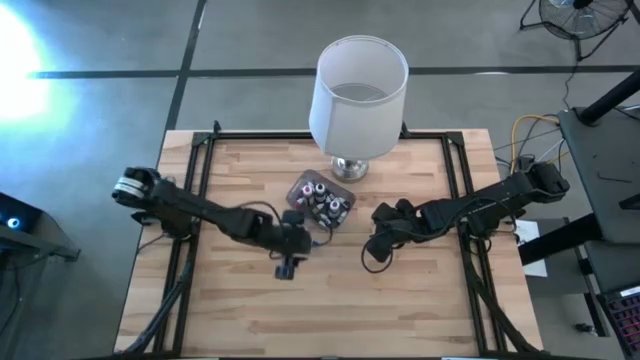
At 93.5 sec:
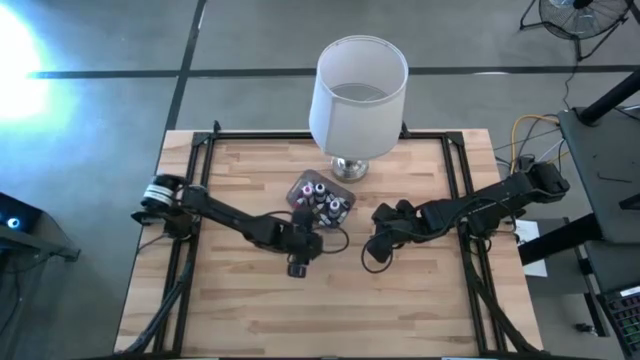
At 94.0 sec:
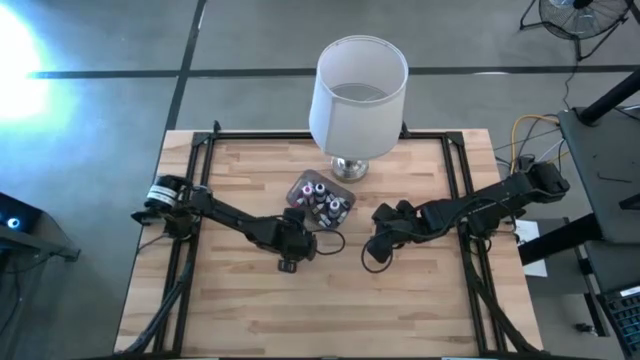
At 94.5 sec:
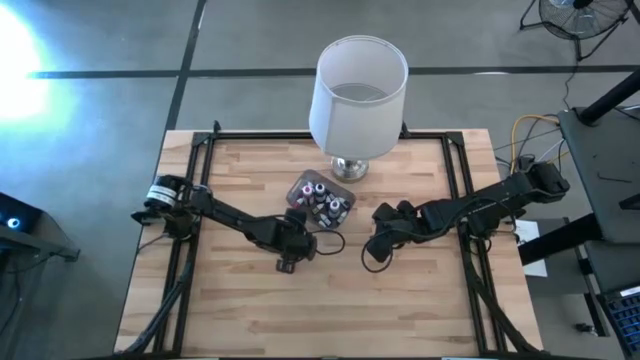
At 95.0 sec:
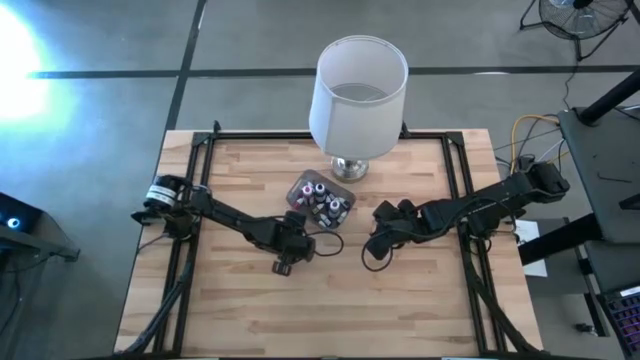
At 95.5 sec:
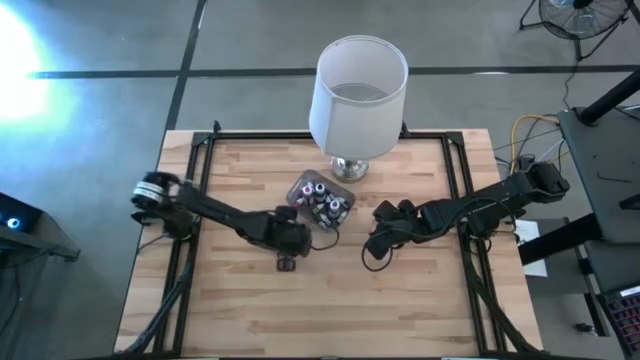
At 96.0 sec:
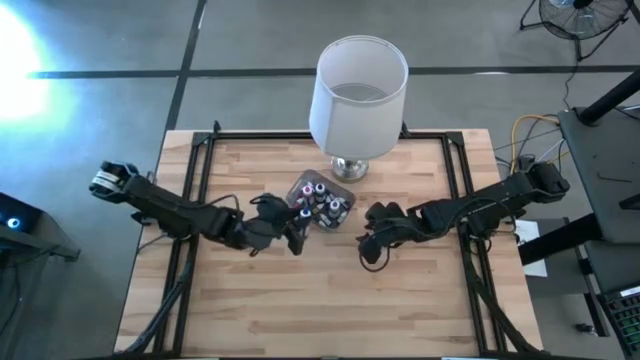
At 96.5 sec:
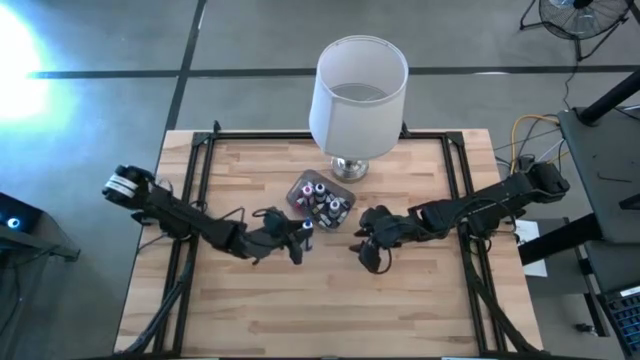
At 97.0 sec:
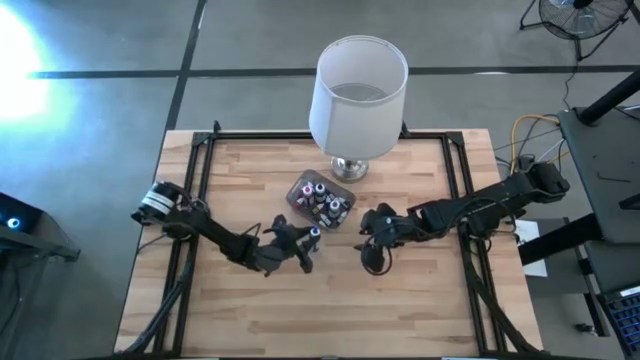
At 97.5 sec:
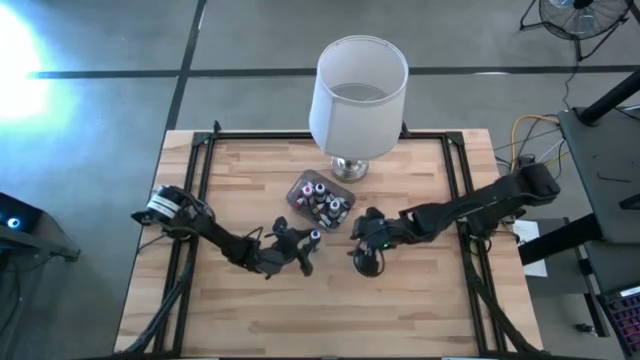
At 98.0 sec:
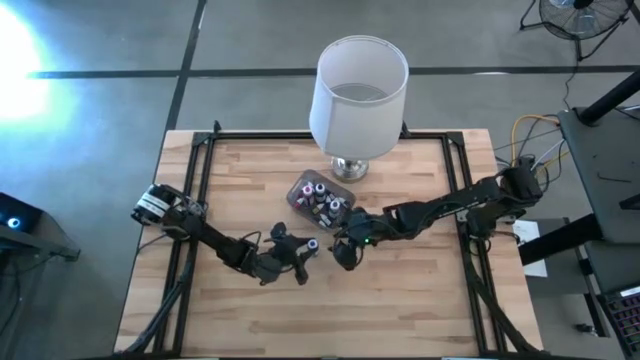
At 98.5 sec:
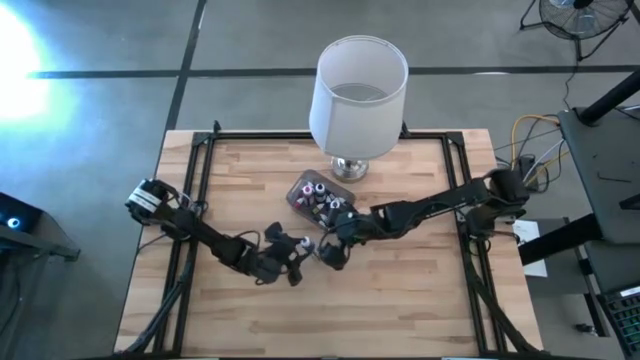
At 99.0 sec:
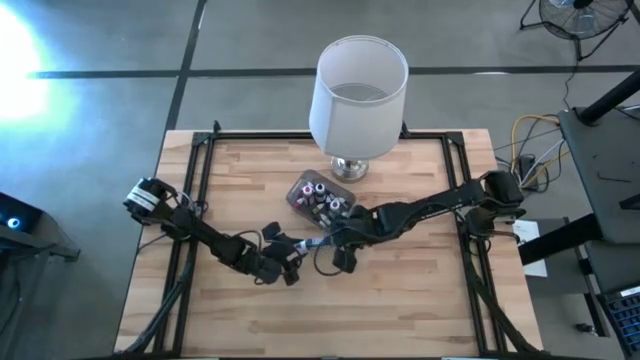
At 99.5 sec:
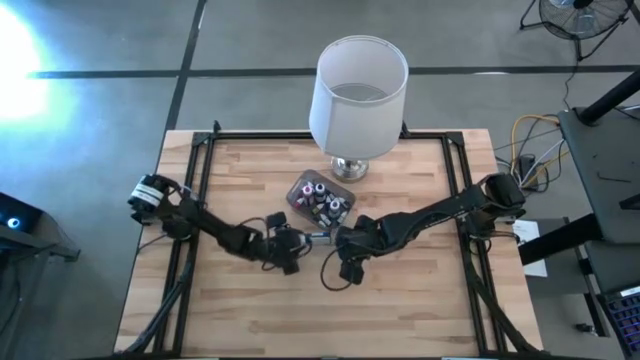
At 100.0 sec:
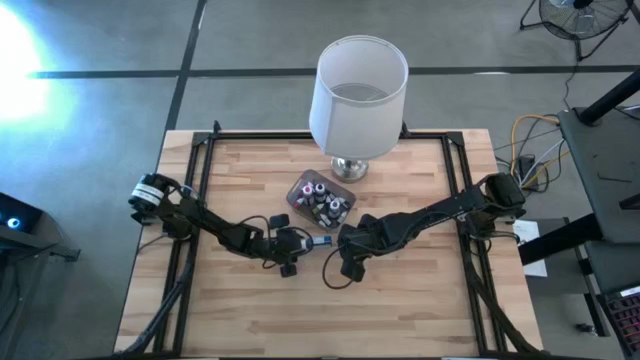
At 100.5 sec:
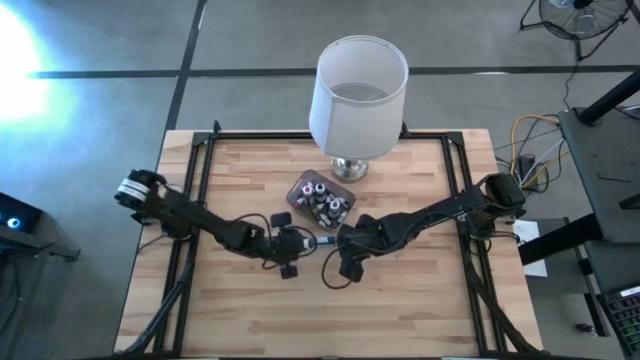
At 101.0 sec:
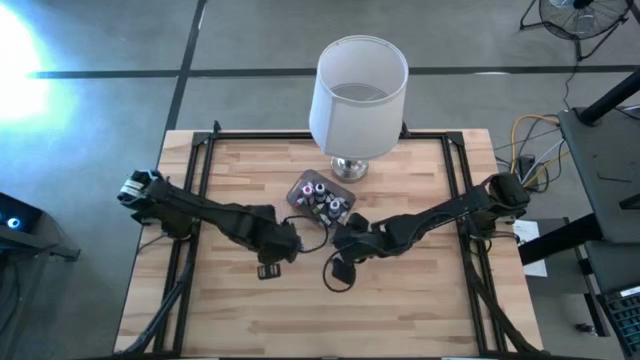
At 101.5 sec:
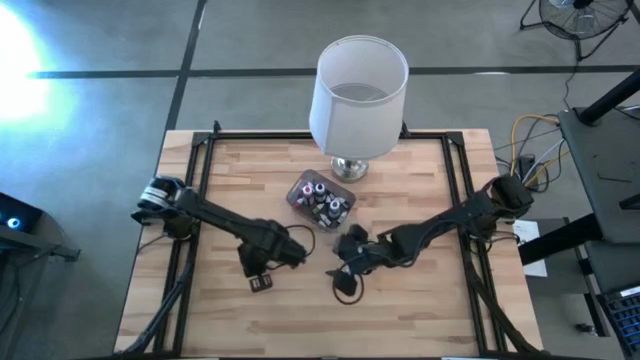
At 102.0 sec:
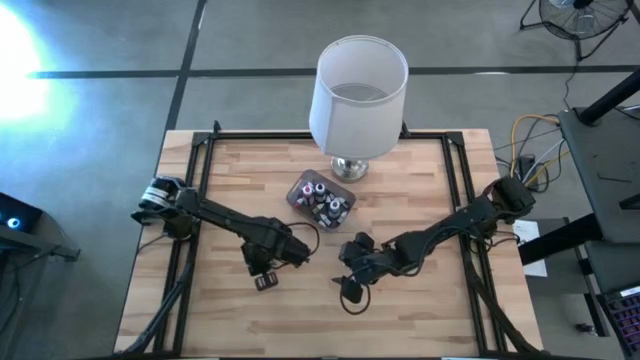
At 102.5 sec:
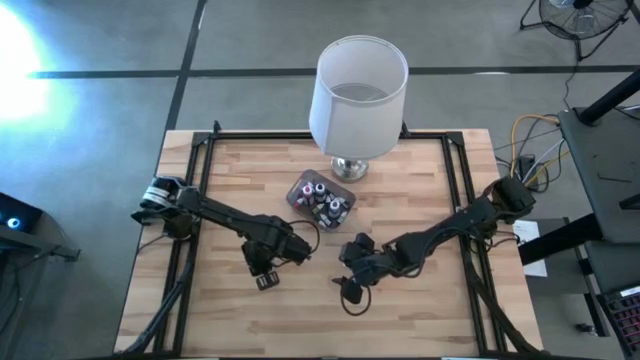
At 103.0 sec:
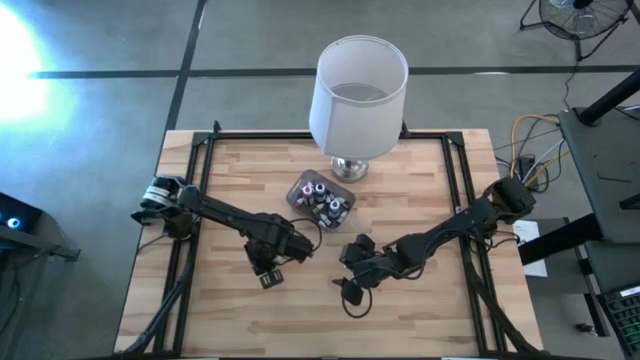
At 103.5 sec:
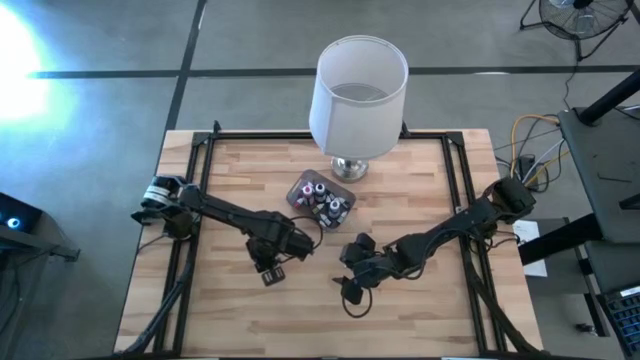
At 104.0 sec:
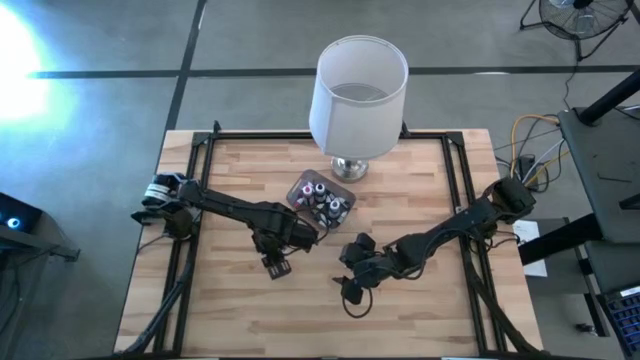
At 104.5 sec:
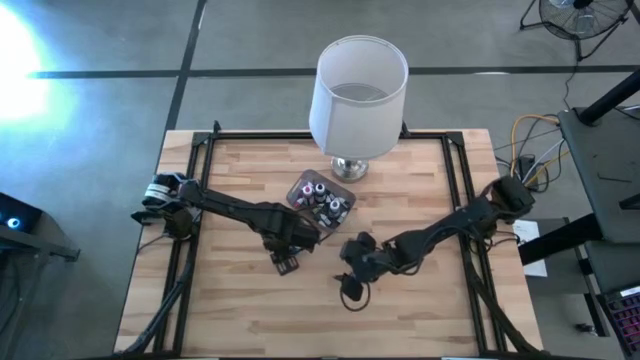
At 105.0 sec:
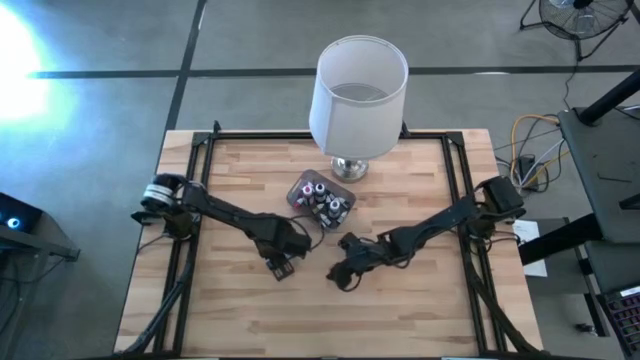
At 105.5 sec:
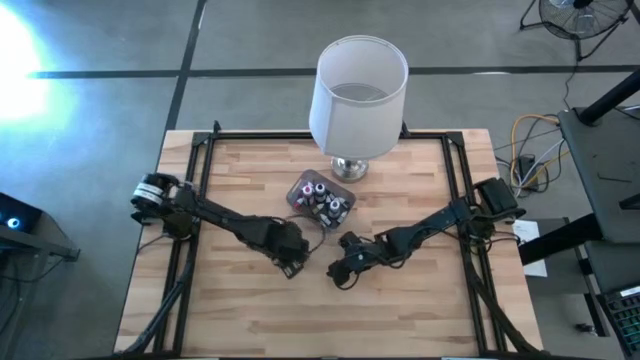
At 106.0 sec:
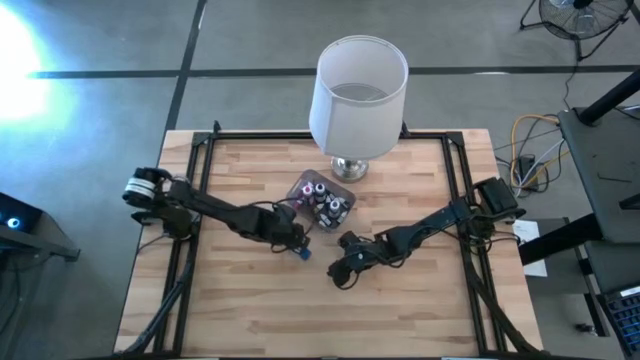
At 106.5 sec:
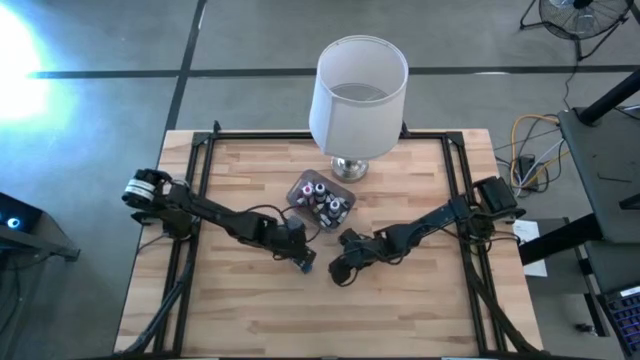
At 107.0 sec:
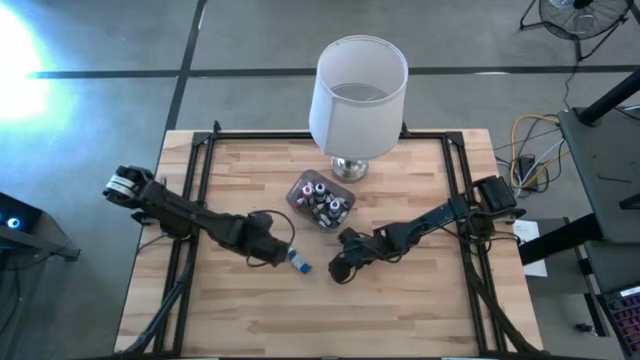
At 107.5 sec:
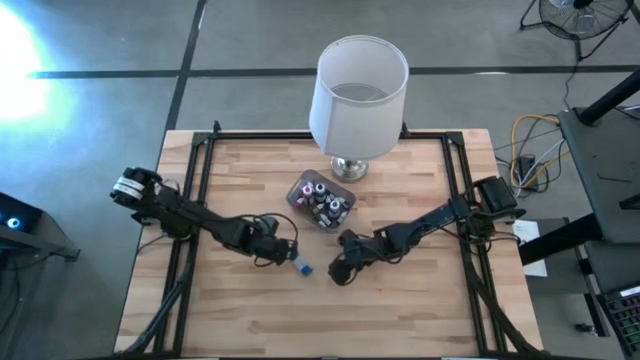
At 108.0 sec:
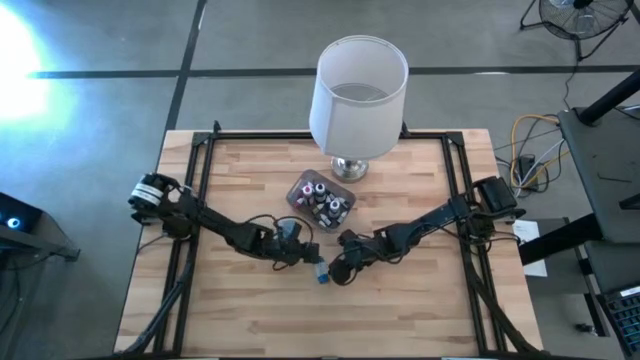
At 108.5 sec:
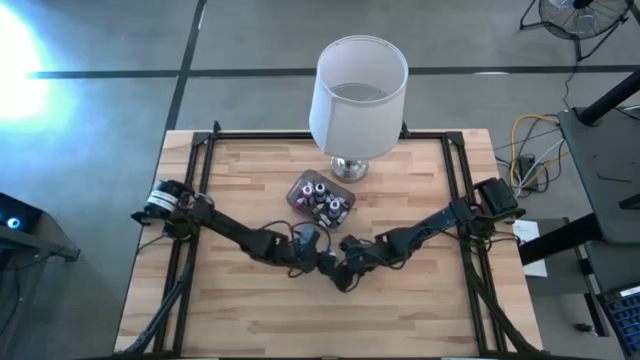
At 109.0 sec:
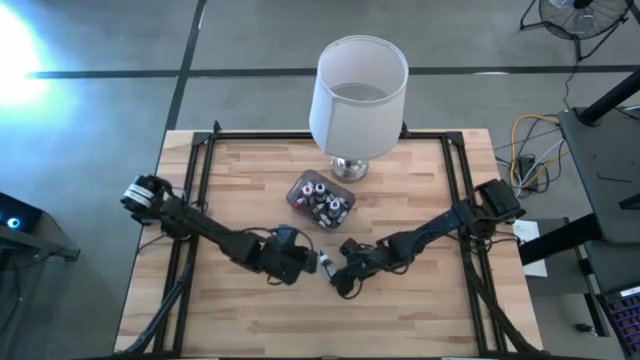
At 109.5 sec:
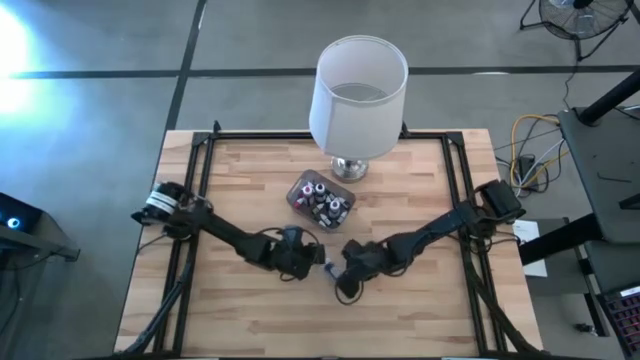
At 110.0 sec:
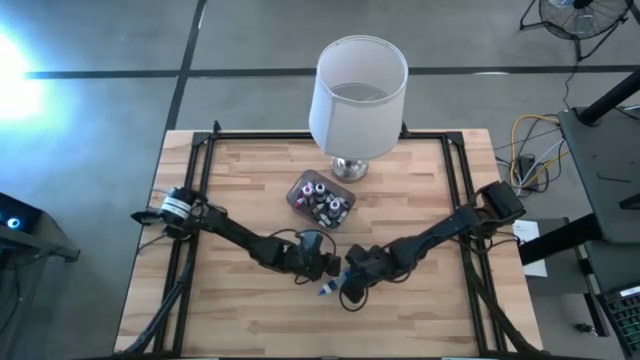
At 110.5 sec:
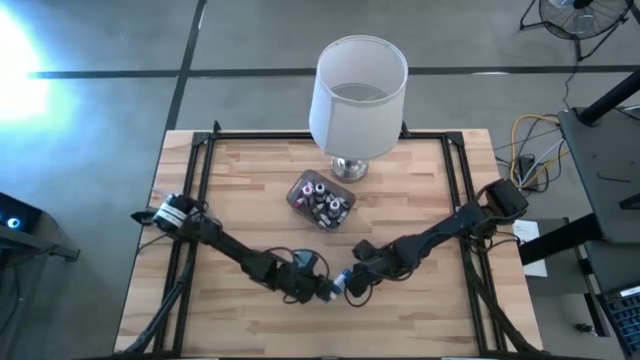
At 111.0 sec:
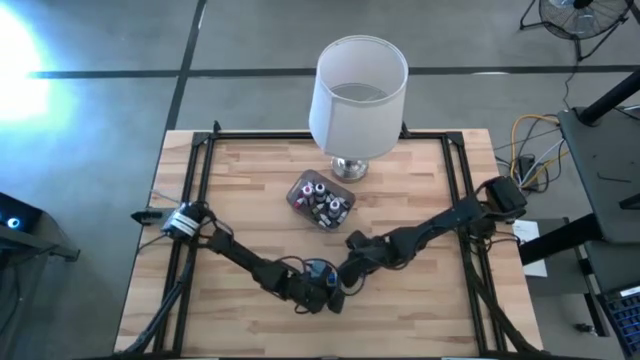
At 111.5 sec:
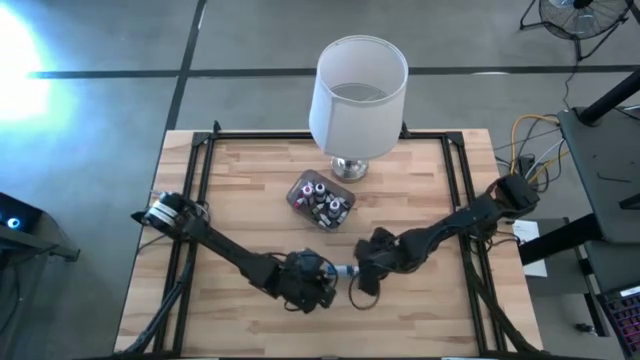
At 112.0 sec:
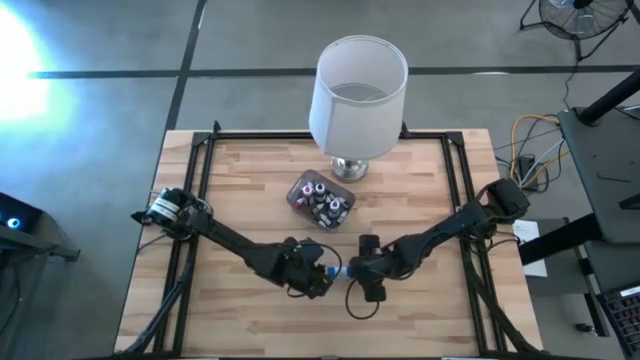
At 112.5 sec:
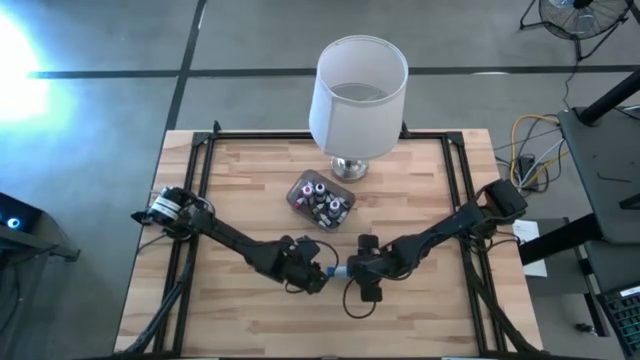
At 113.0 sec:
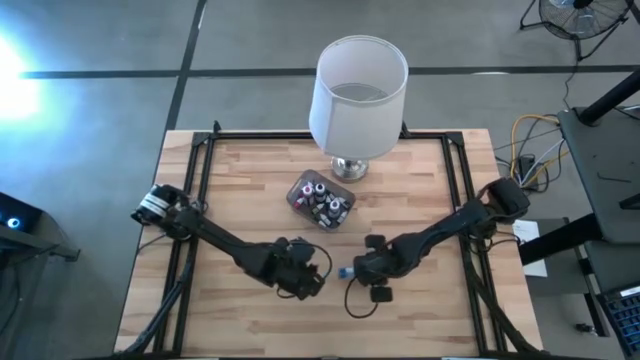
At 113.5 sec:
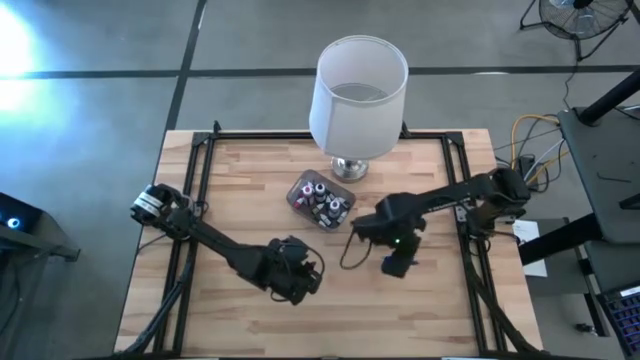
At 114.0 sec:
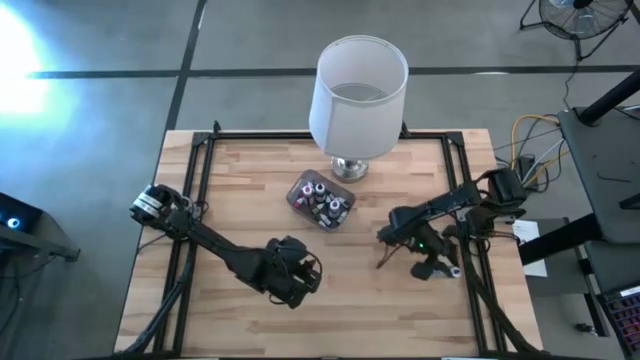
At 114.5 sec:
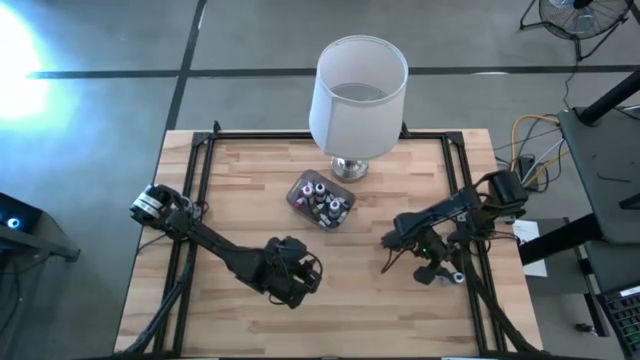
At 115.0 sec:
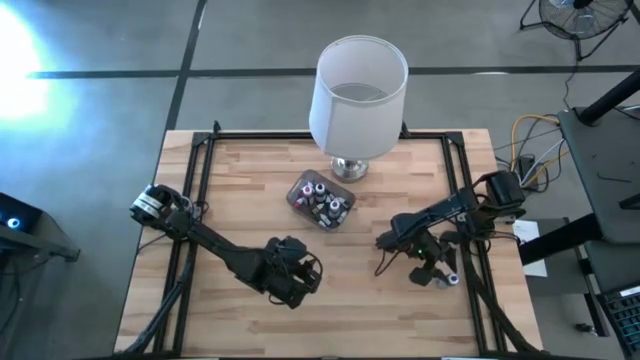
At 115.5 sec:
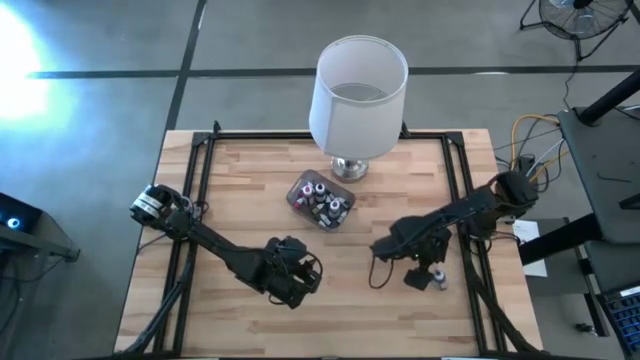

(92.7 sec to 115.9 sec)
Task: Pick & Place food coloring
Put the large blue food coloring into the black bin
